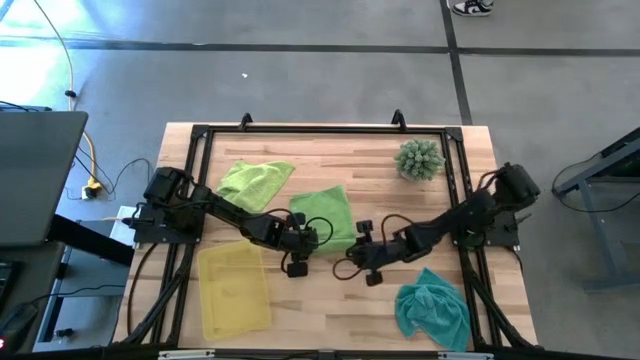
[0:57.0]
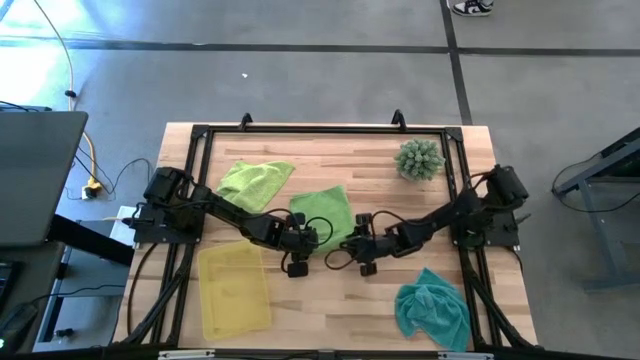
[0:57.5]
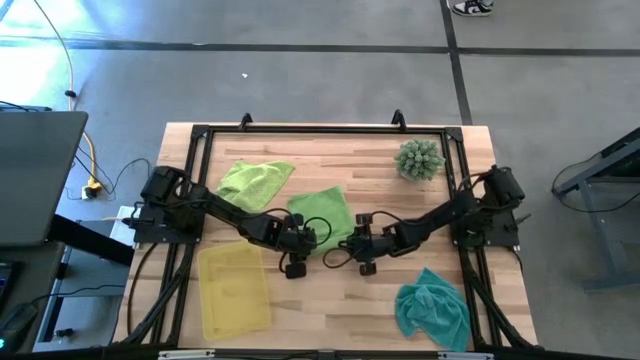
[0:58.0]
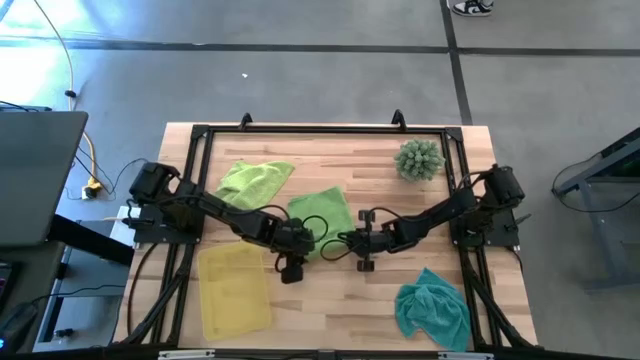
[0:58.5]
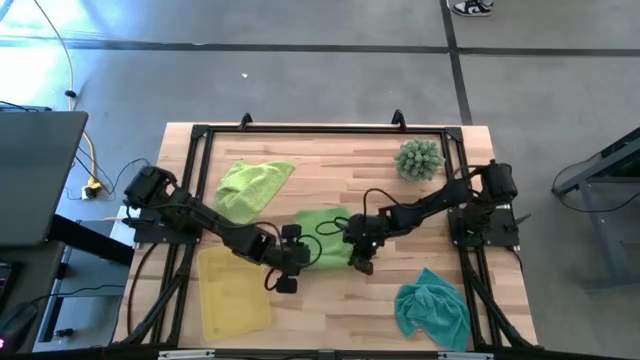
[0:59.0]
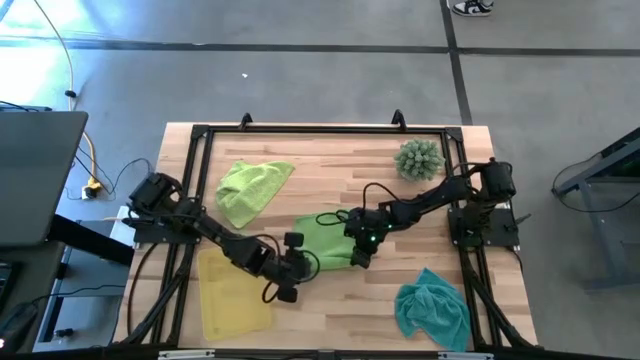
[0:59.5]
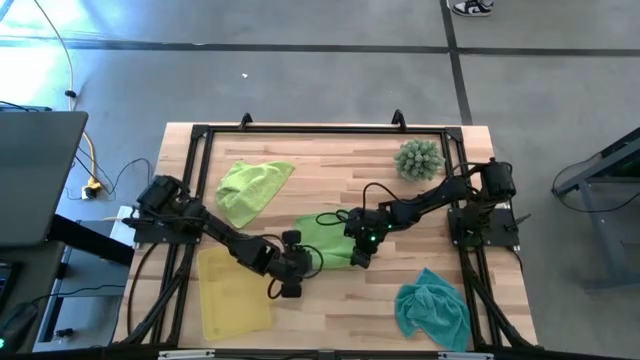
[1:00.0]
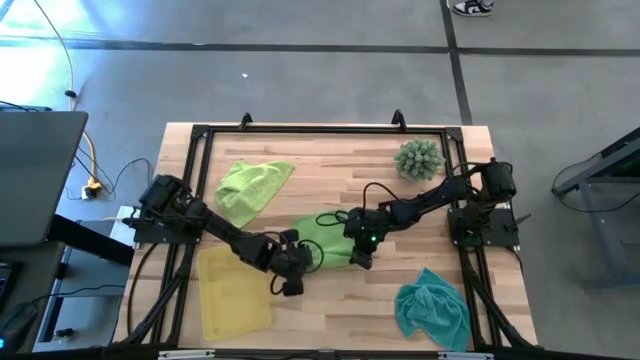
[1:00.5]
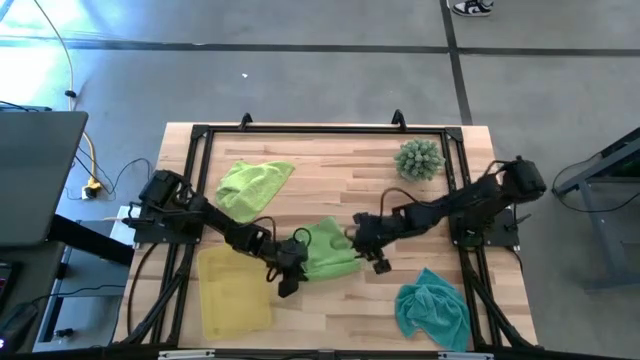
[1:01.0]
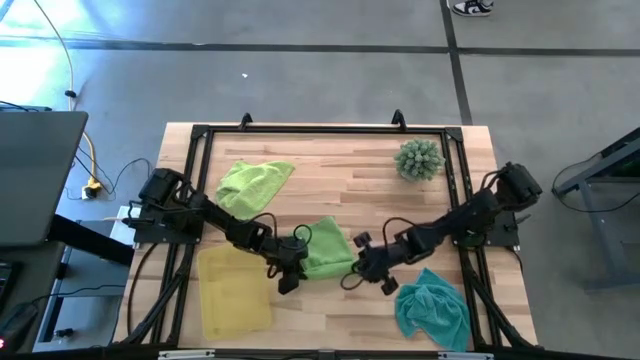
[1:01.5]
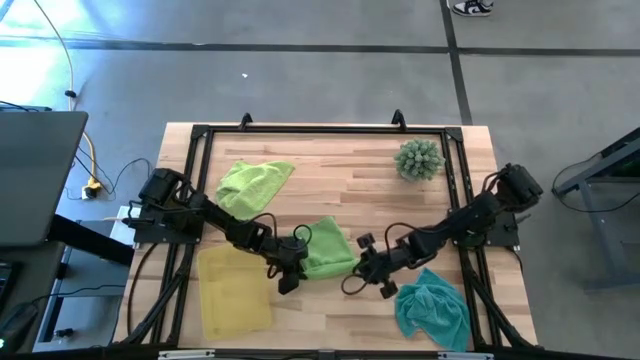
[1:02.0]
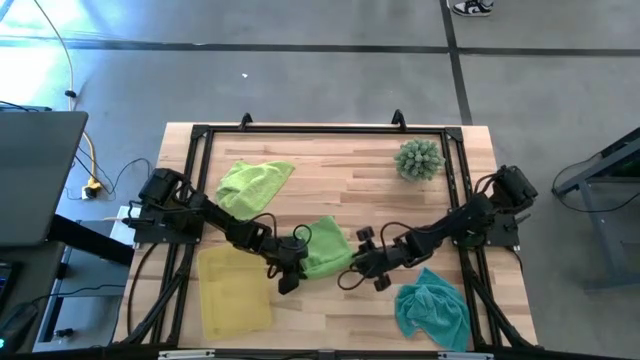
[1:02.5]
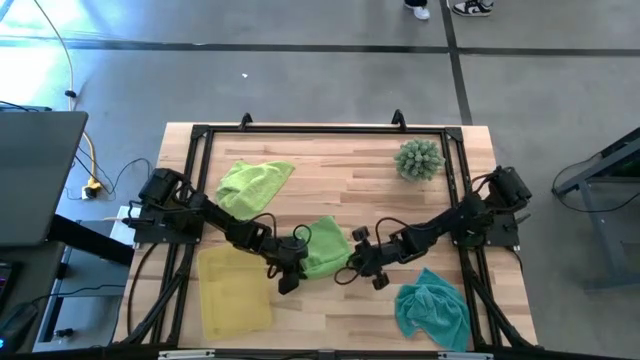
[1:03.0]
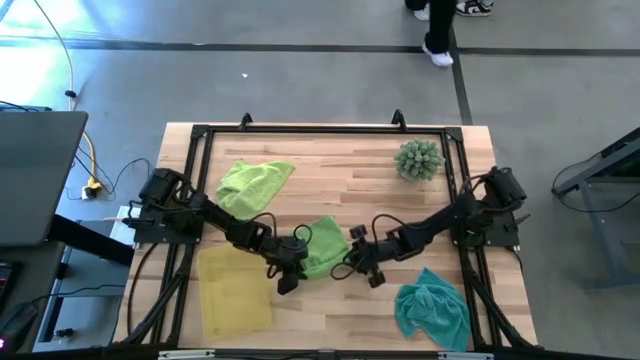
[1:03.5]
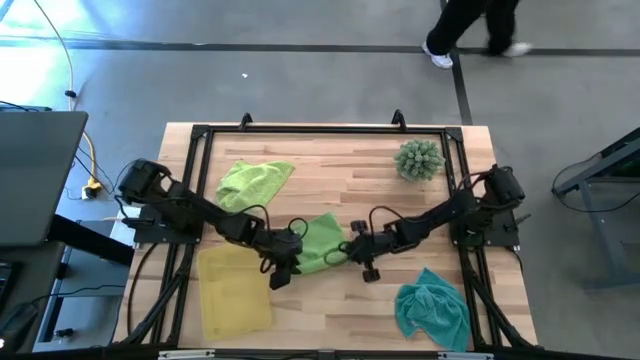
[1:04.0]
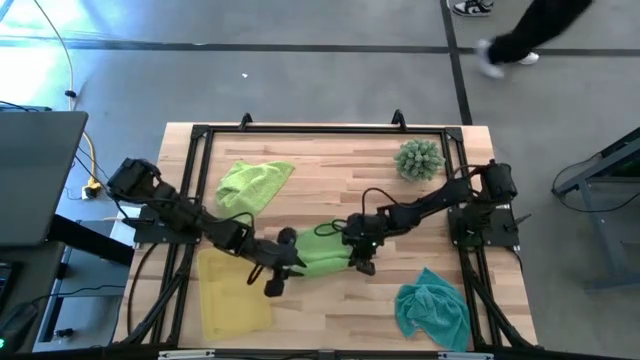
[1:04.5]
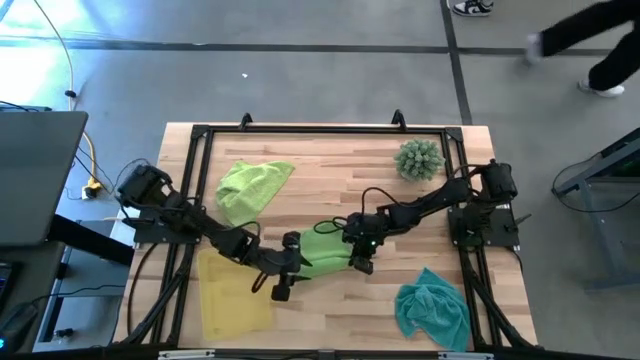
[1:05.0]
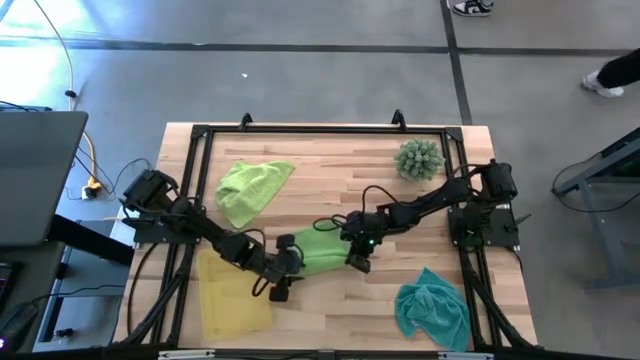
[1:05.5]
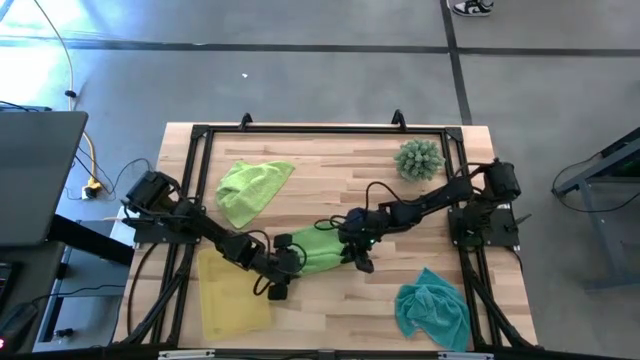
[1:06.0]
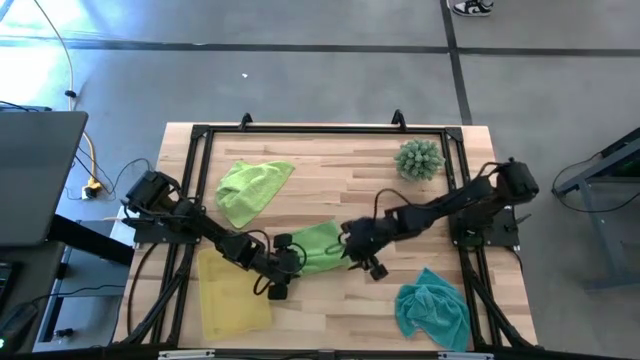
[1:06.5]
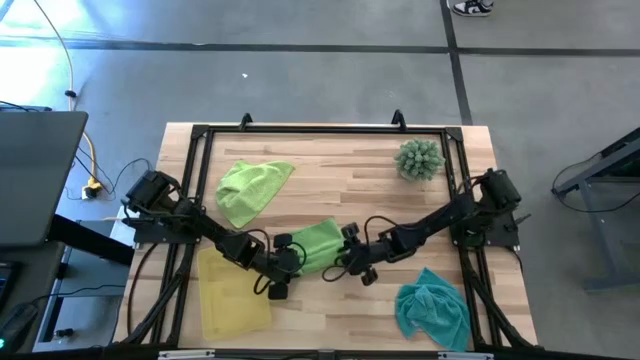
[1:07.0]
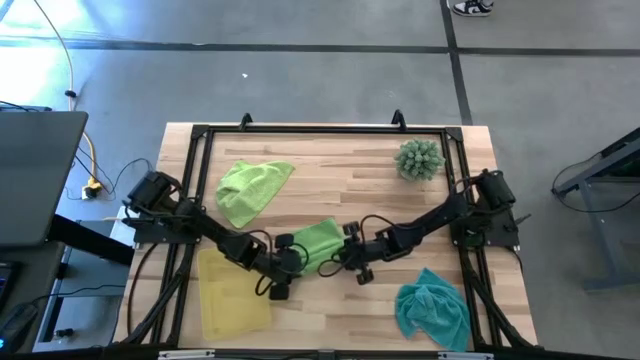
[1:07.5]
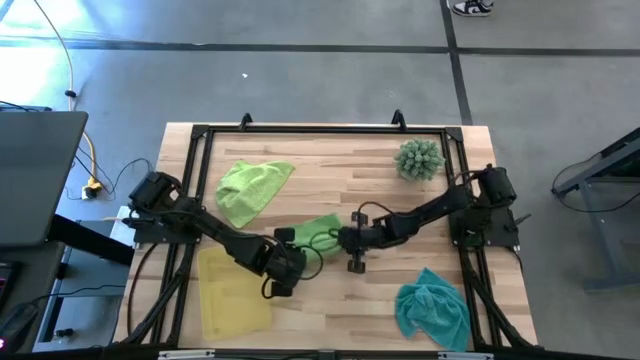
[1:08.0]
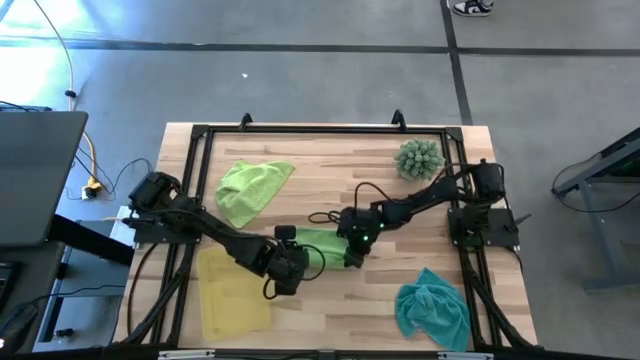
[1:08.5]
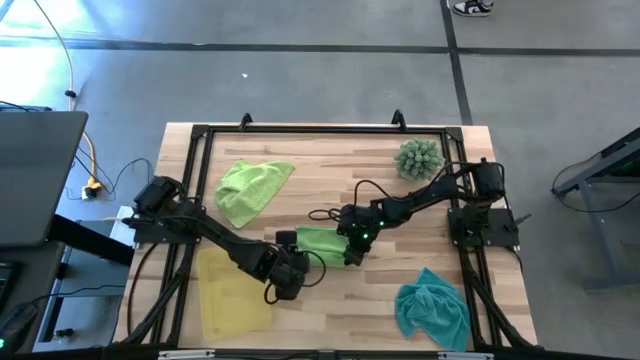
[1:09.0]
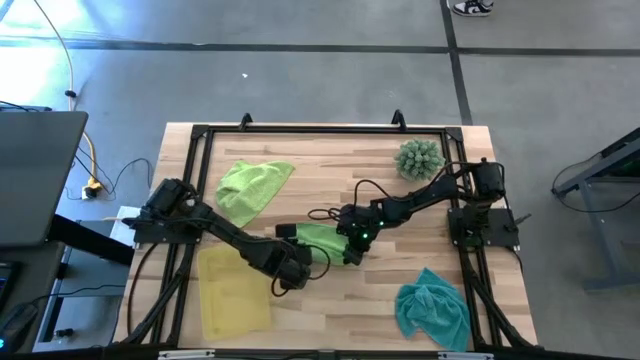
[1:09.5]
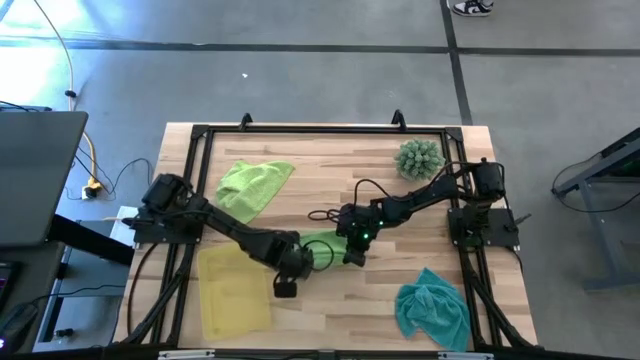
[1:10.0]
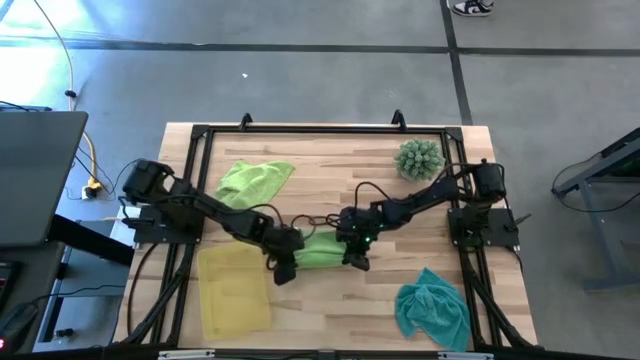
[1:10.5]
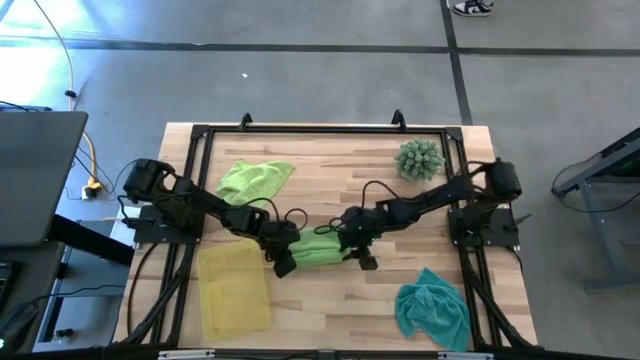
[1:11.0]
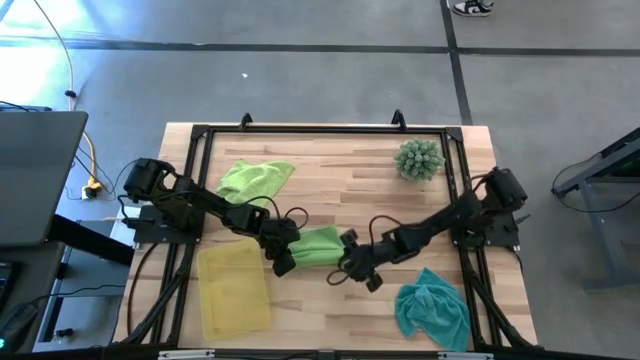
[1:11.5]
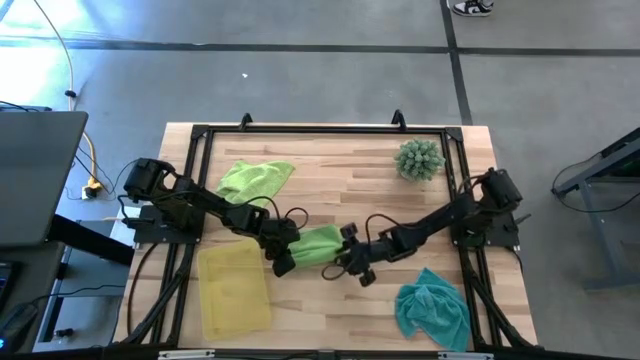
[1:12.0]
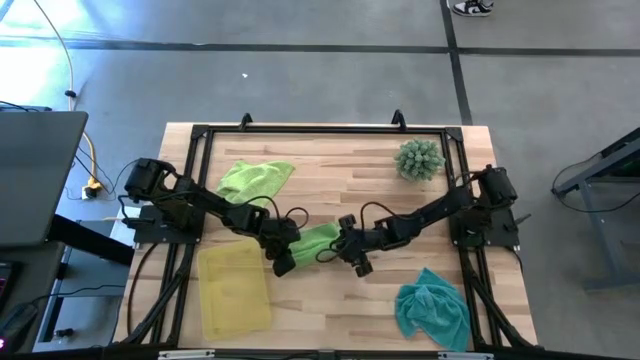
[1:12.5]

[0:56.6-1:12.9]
Task: Roll microfiber towels into tight, uniform cylinder then place into a basket
Roll the green microfiber towel

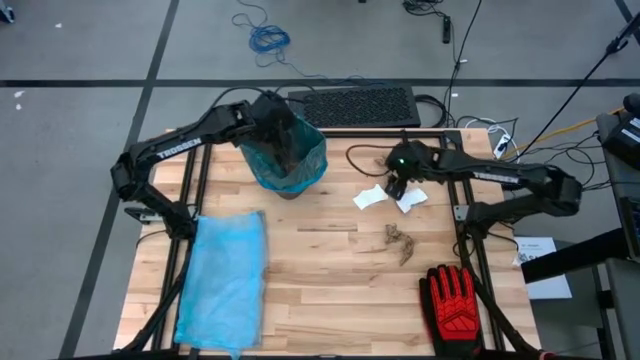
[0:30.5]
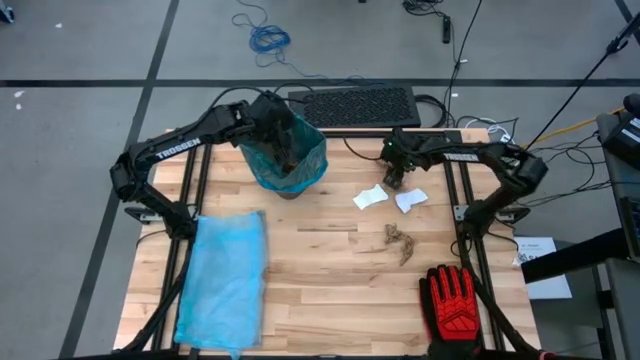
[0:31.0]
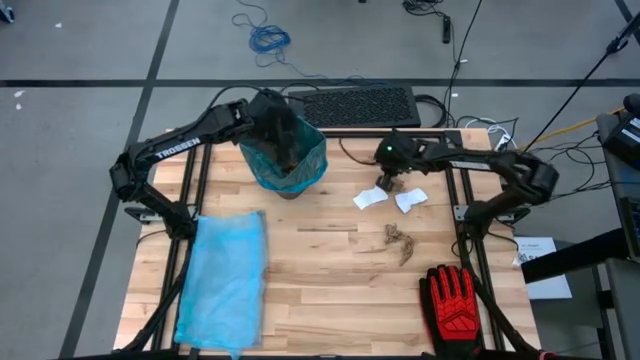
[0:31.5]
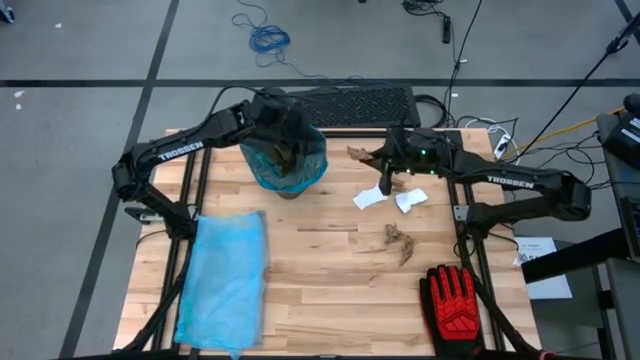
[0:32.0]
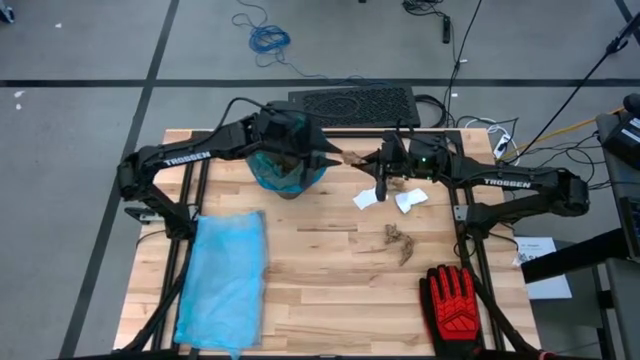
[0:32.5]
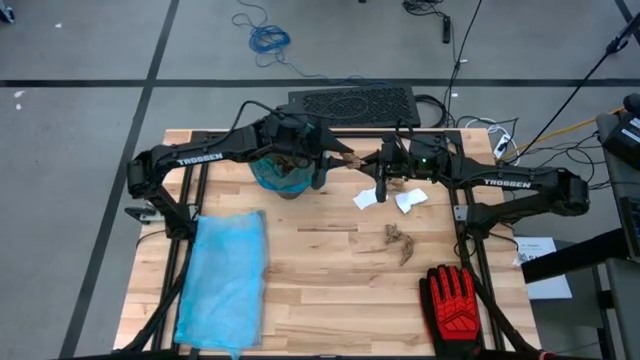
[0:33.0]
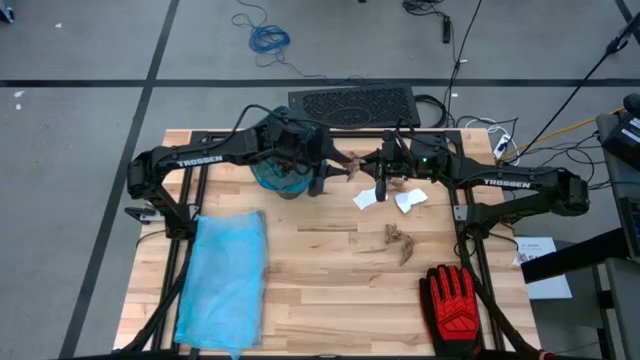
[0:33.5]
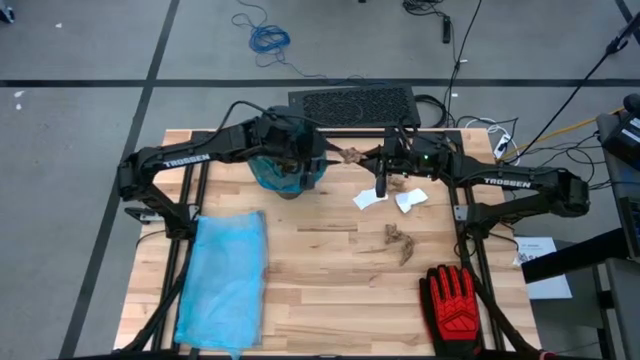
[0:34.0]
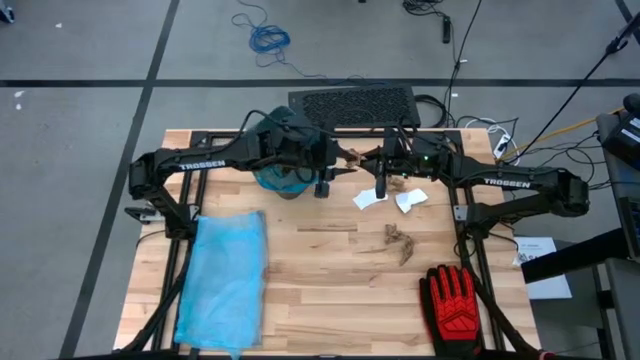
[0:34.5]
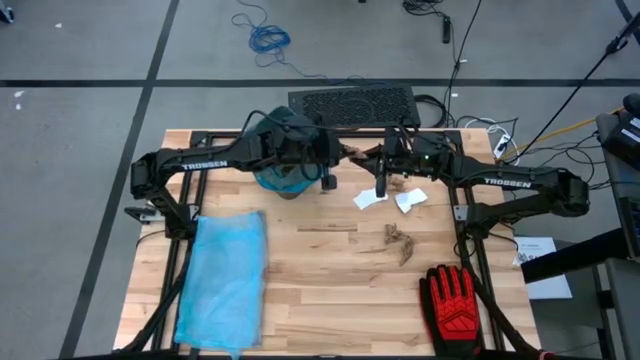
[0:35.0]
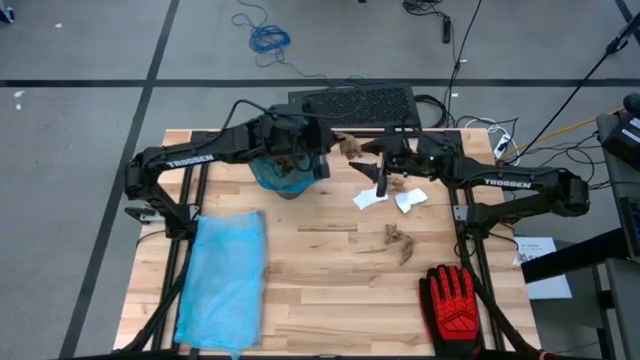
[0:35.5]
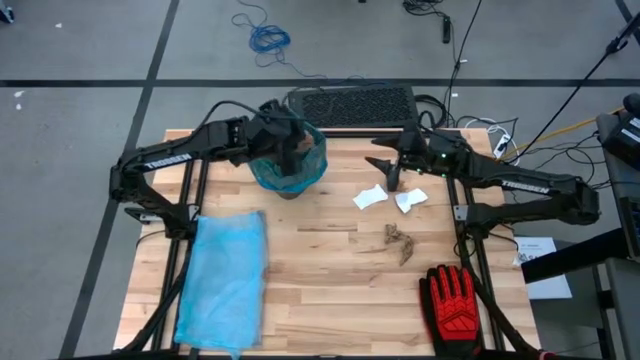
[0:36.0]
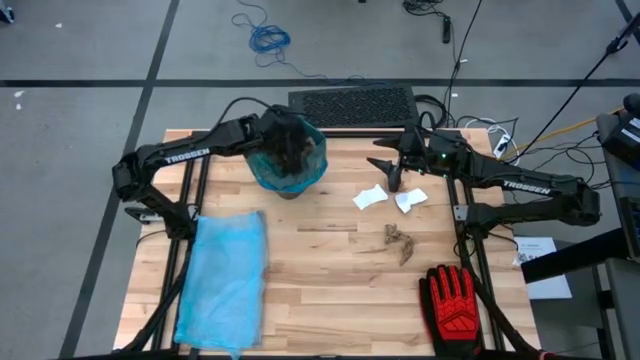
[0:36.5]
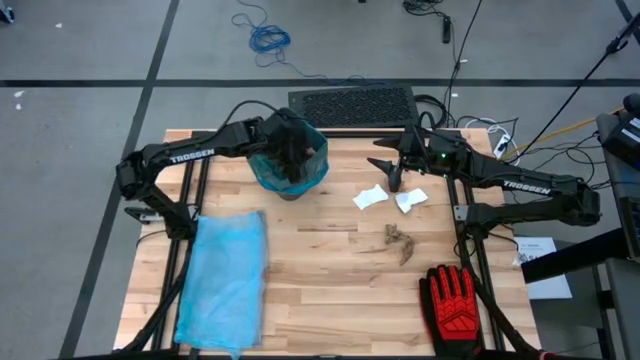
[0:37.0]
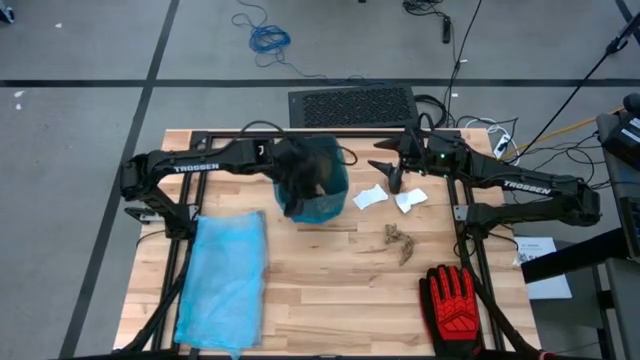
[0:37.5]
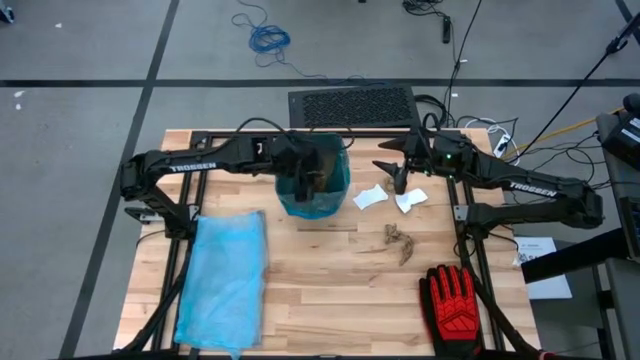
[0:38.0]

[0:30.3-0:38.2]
Task: place trash/remove bag and relplace
Put the brown napkin into the black trash bin
